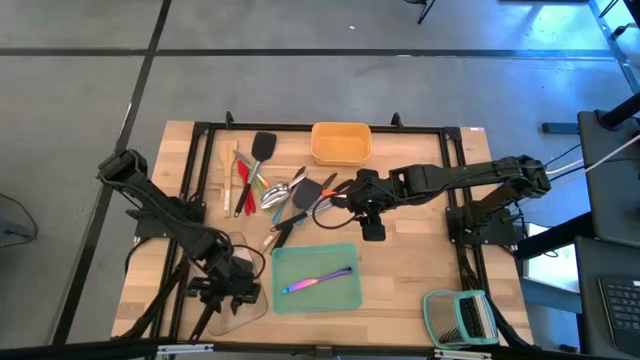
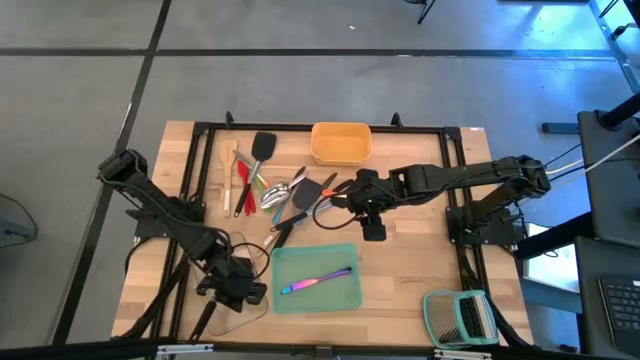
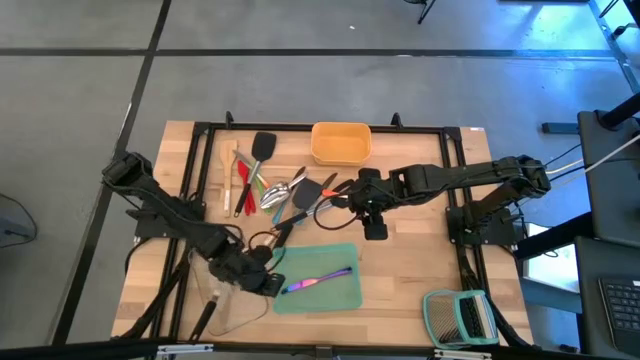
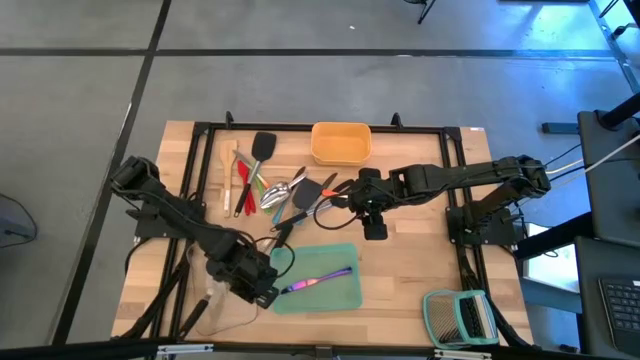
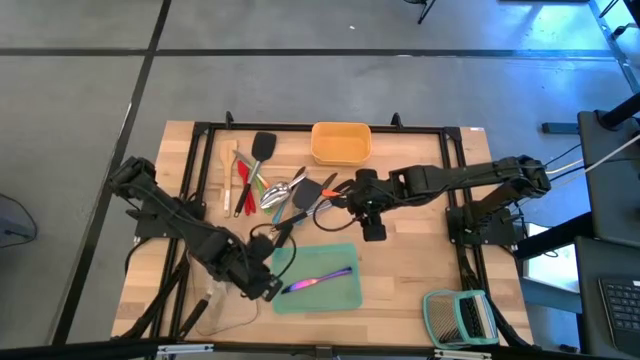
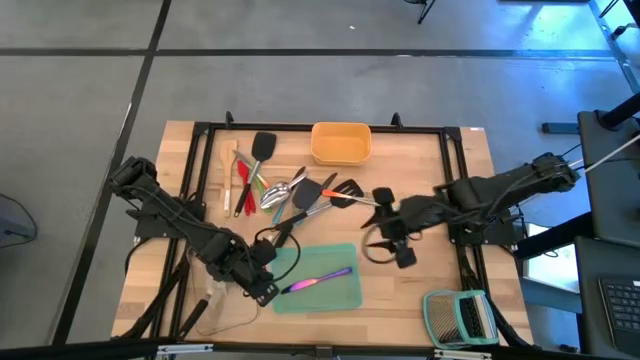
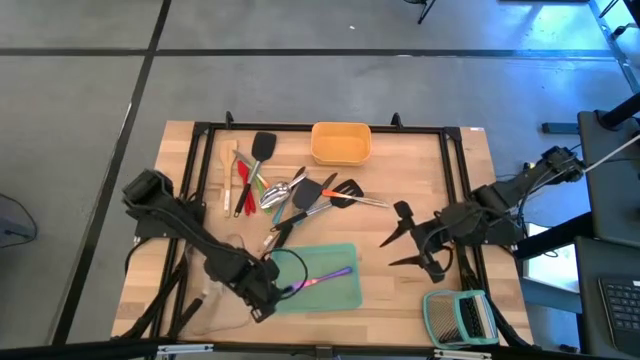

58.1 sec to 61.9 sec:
Task: Pick & Place Kitchen Items
Adjust the transparent bin

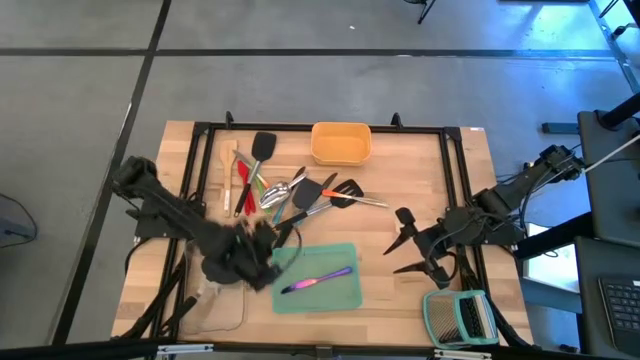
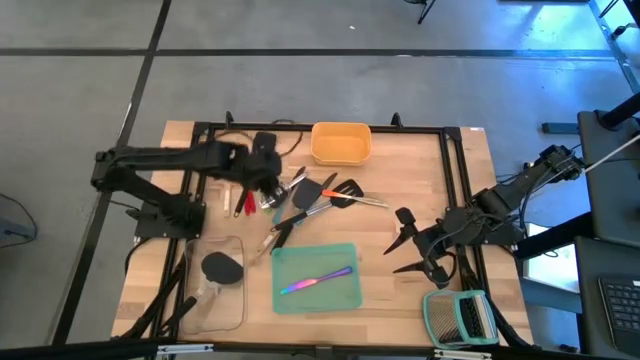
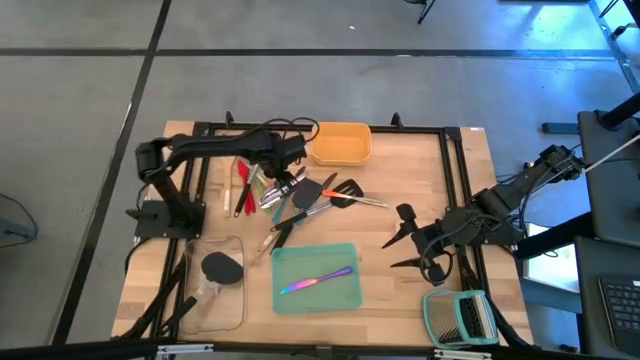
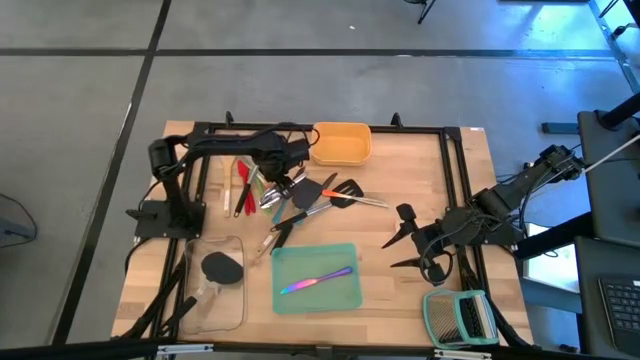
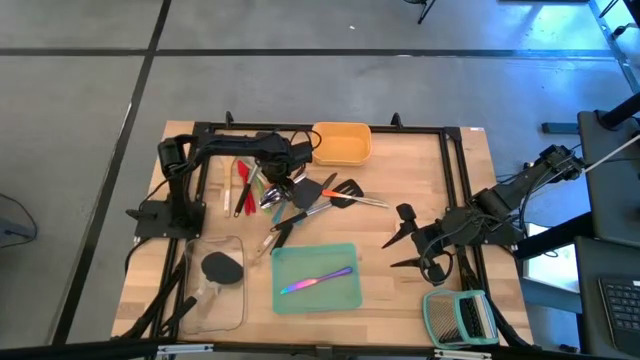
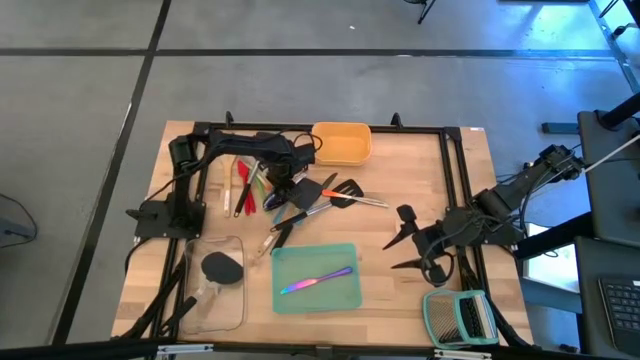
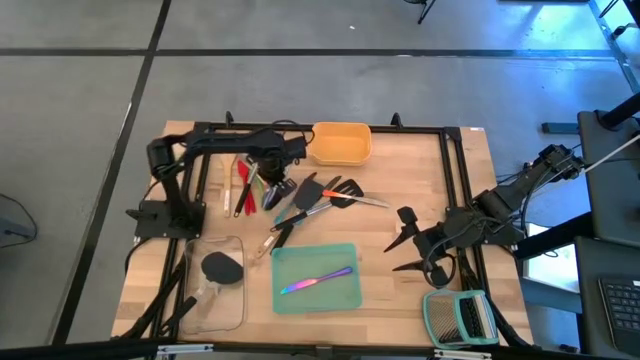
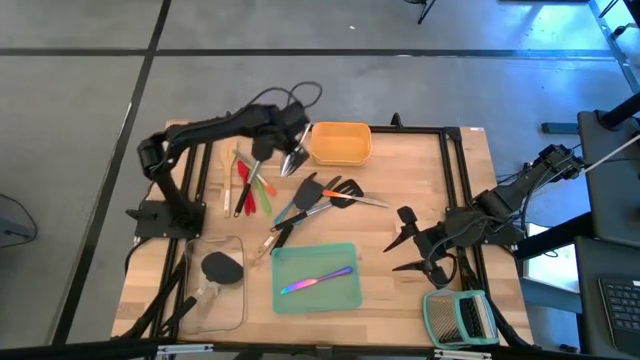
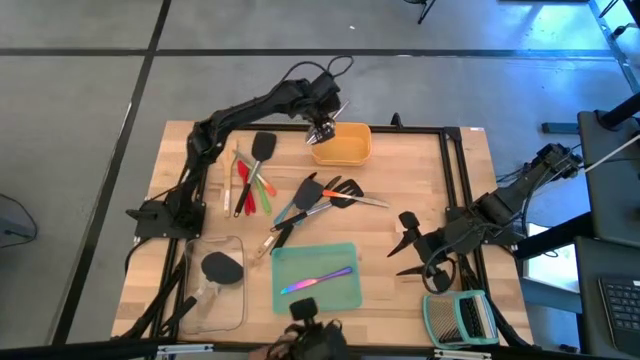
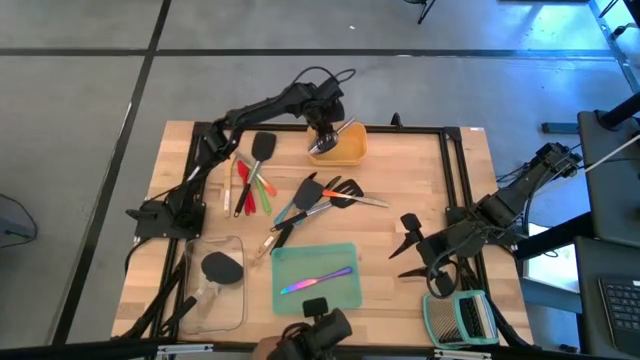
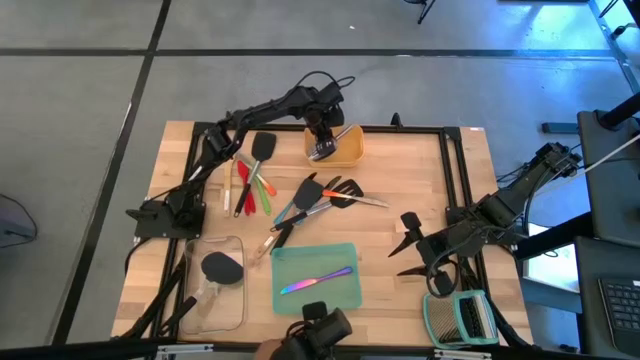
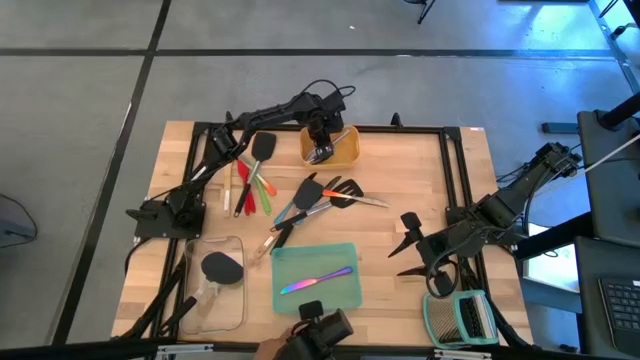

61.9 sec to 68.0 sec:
Put the steel scope into the yellow bin

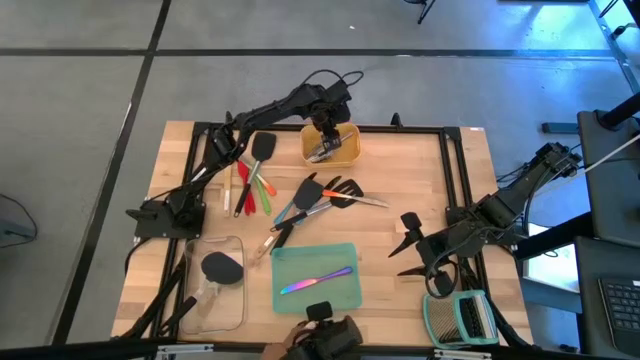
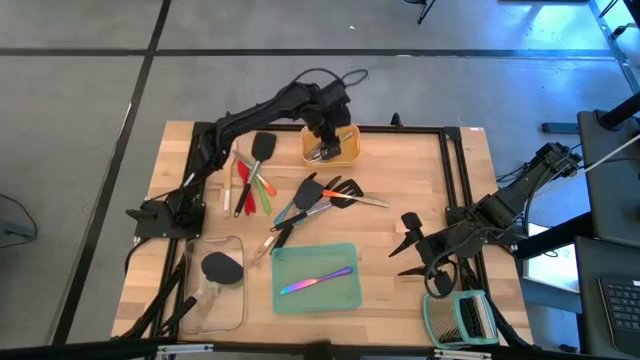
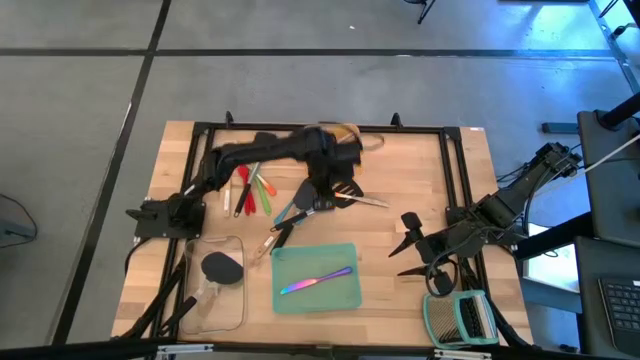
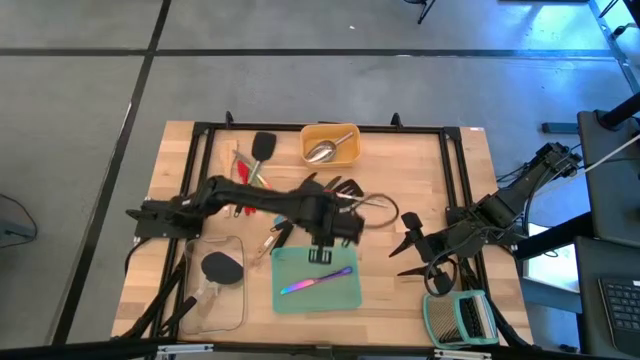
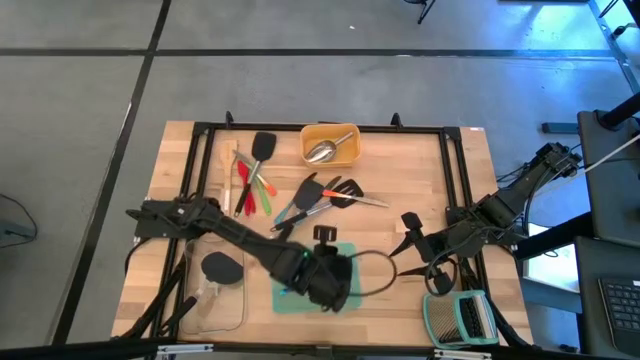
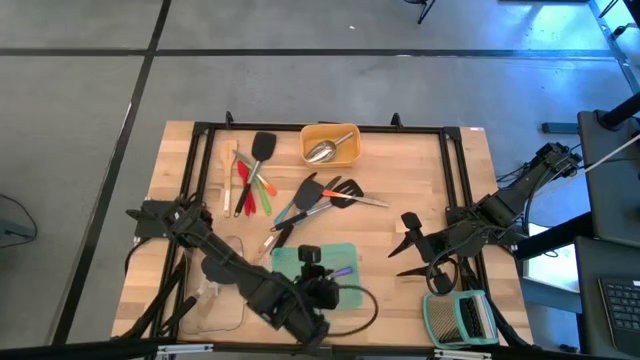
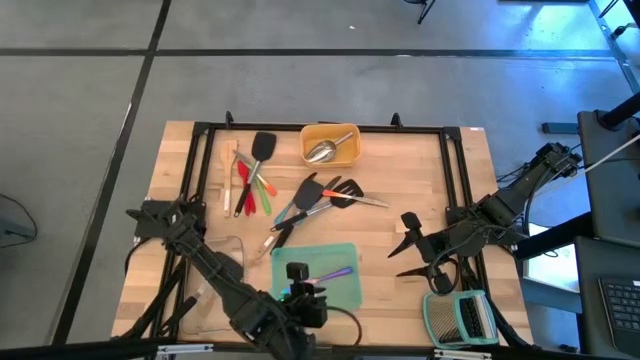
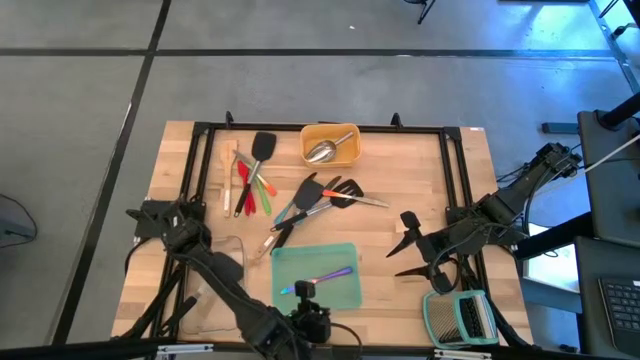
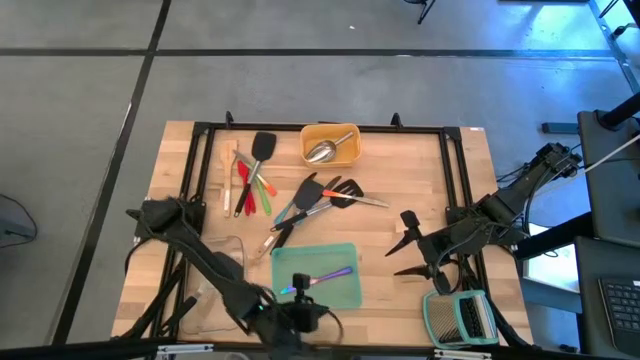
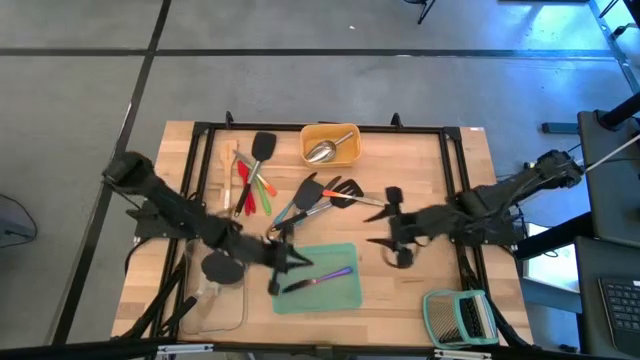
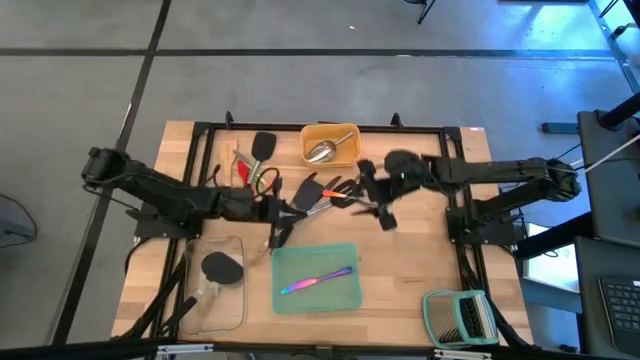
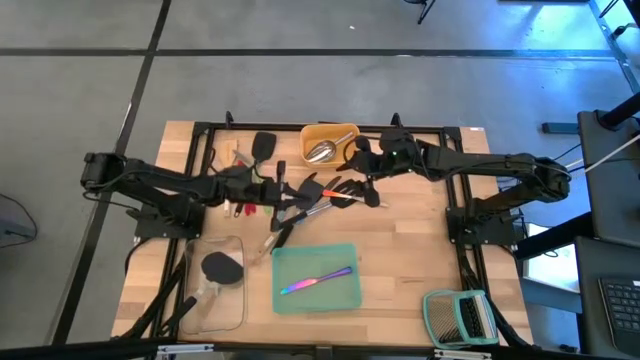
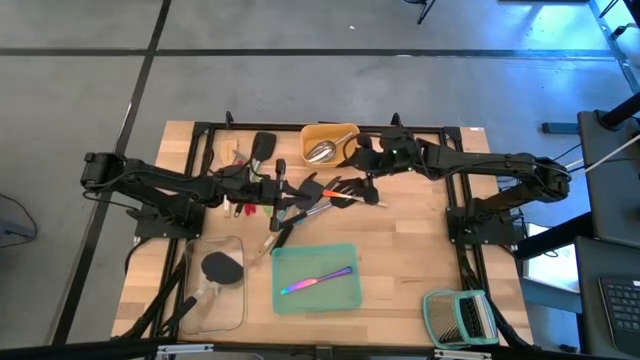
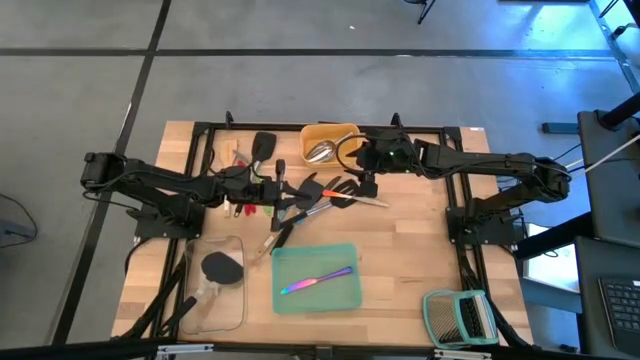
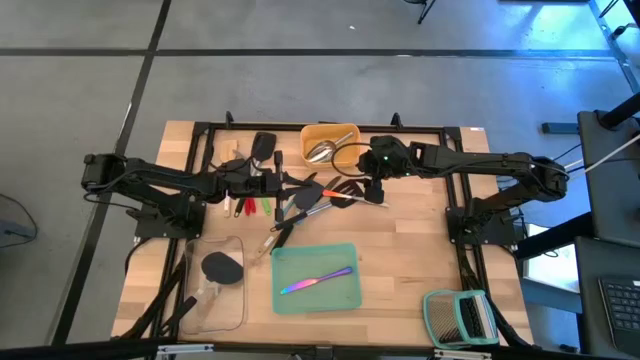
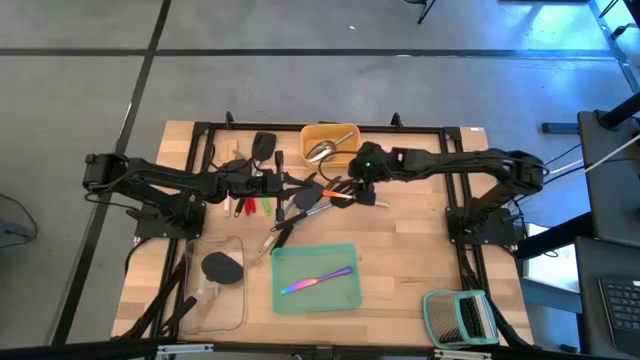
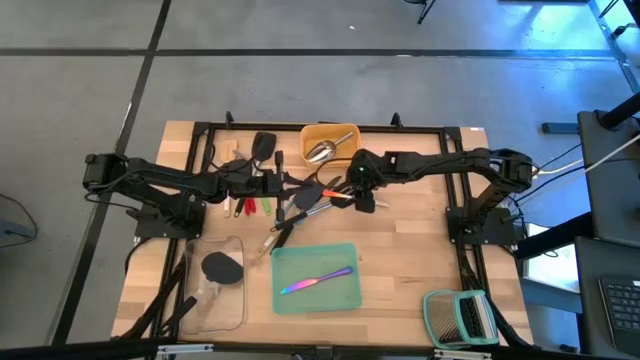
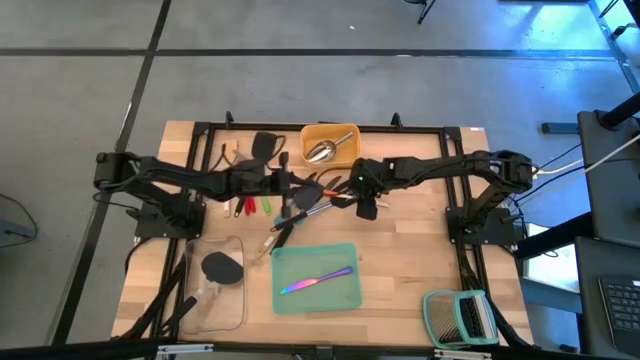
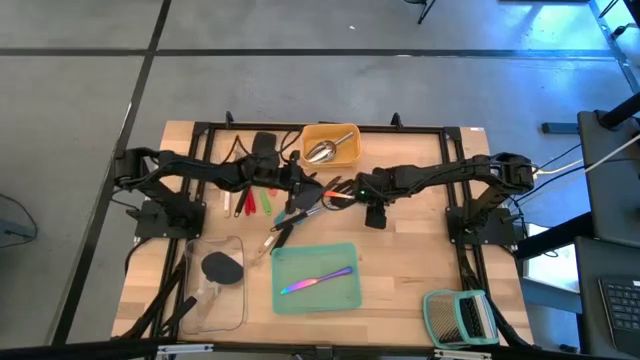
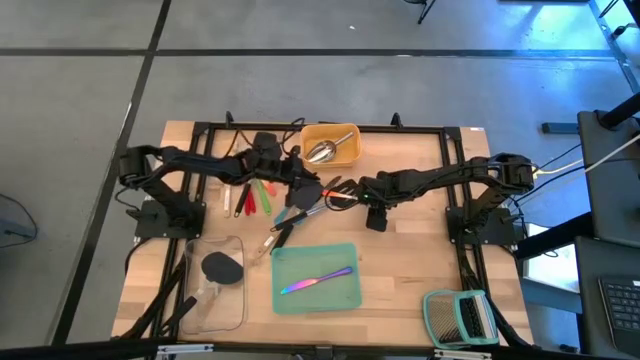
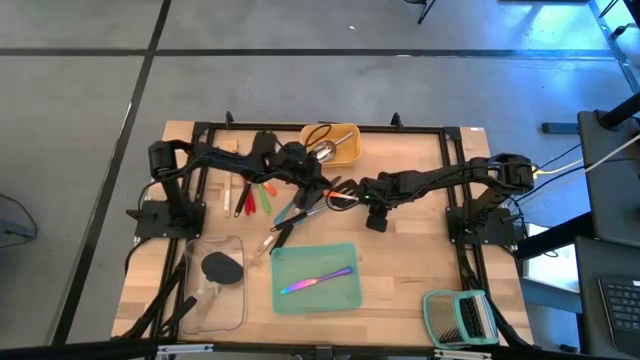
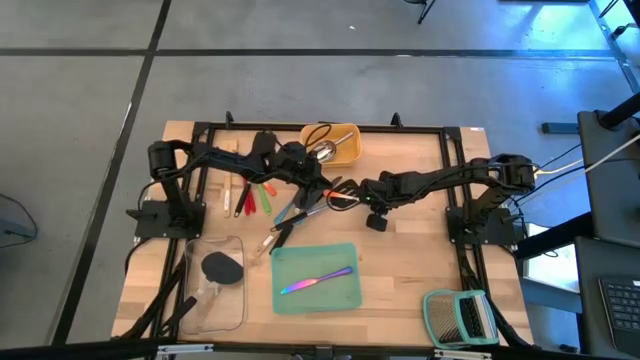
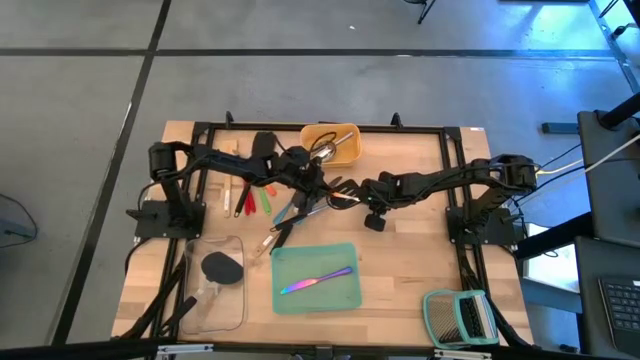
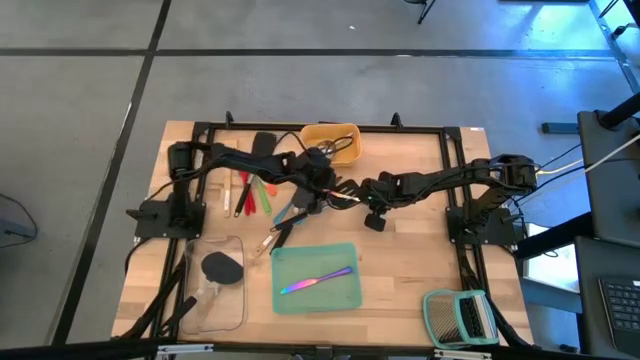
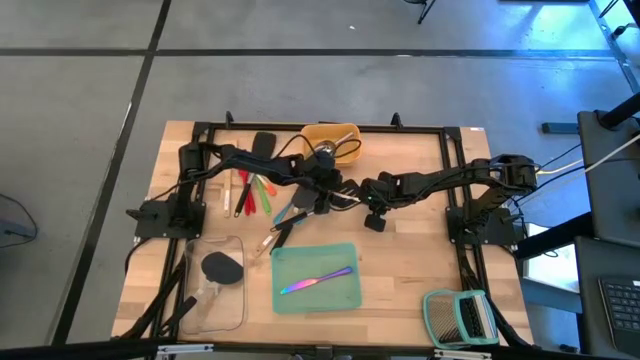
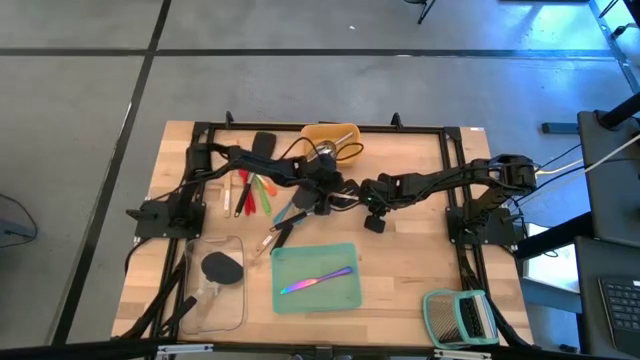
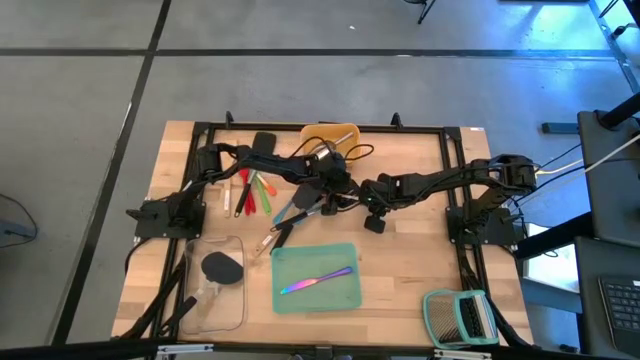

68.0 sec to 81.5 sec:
Put the orange table knife into the green bin
